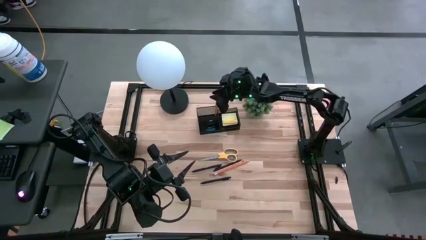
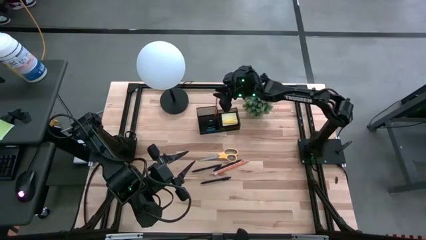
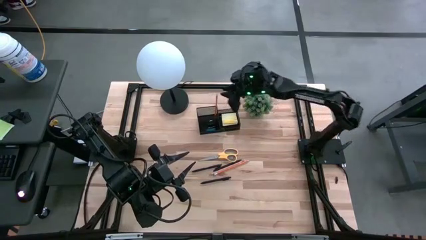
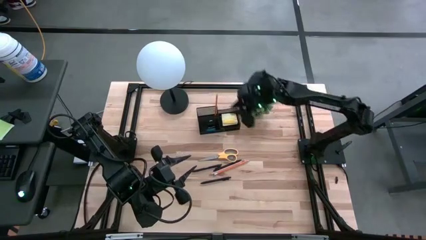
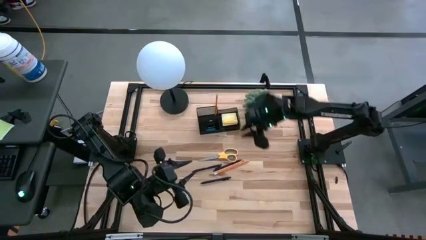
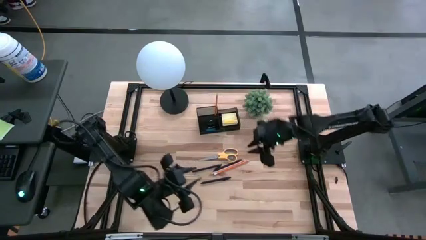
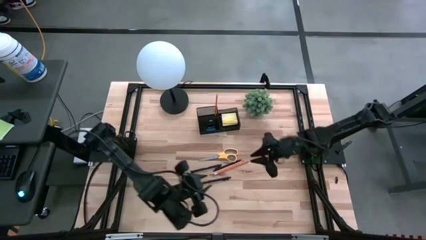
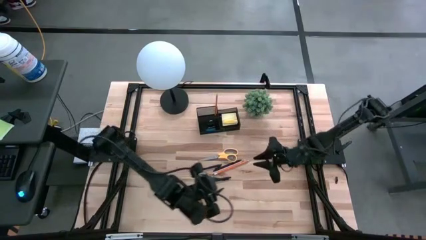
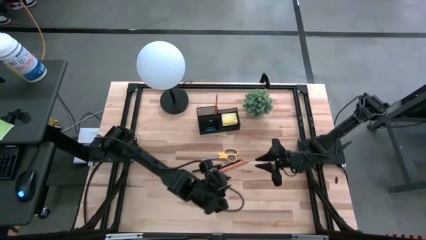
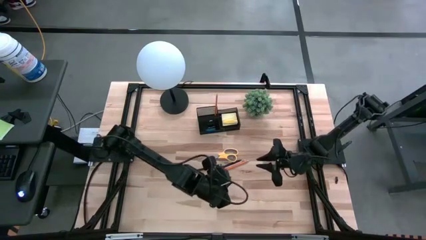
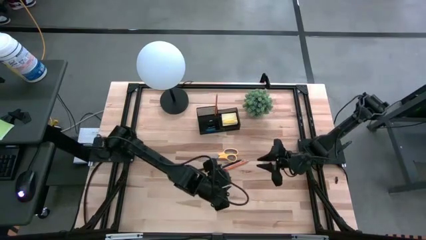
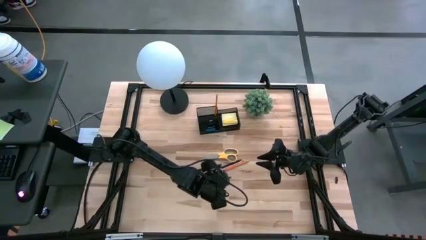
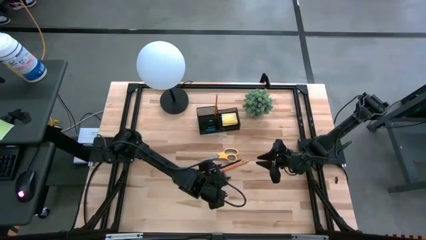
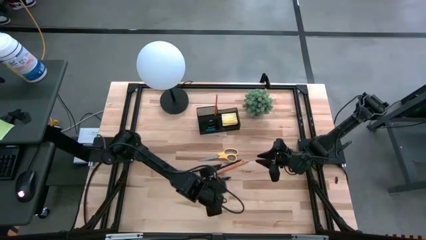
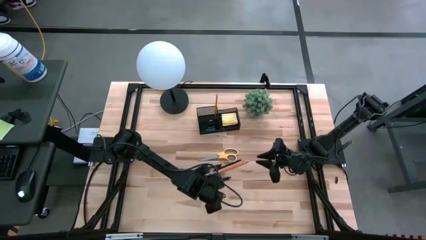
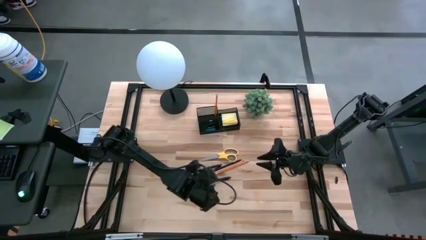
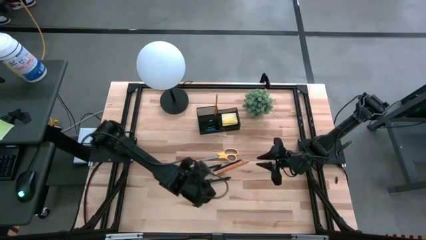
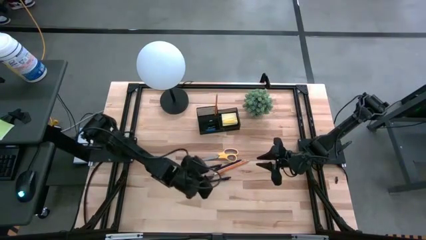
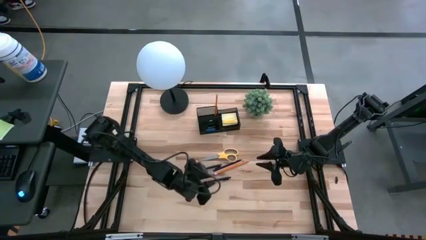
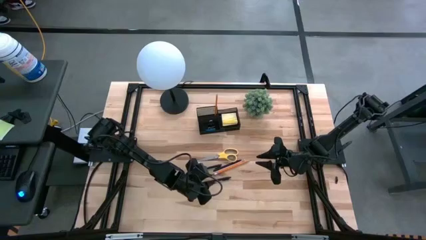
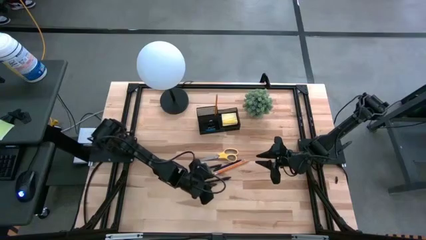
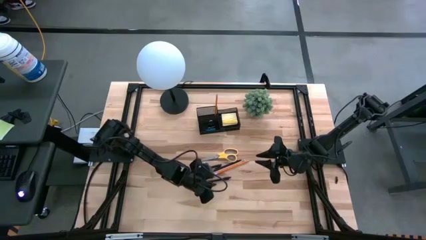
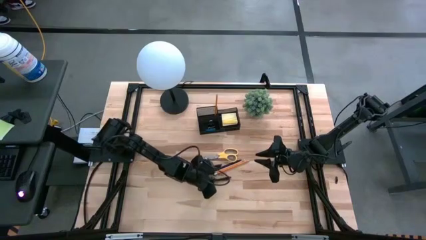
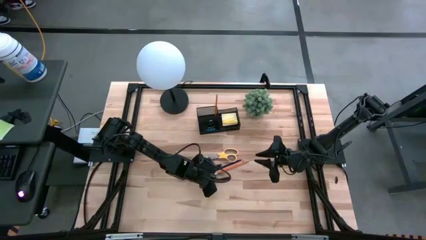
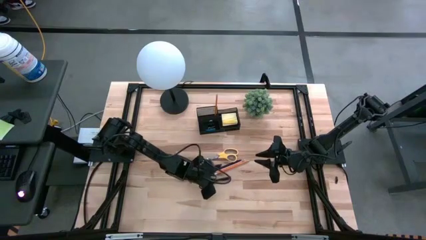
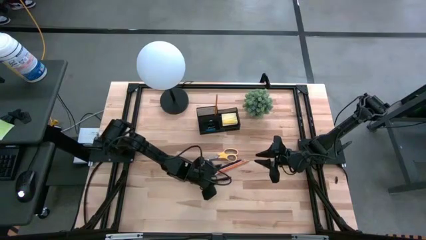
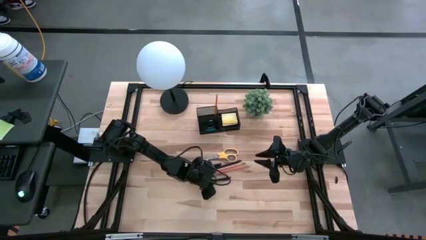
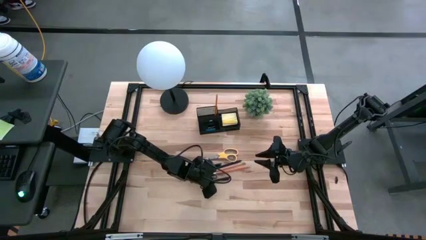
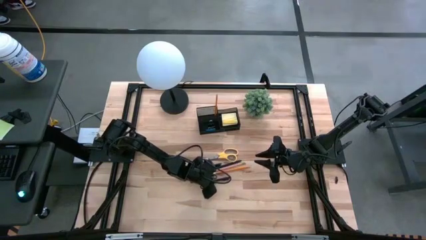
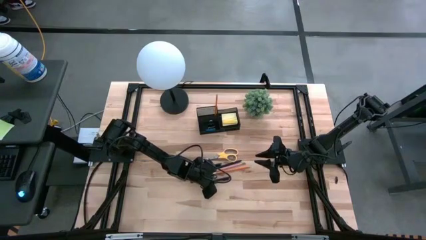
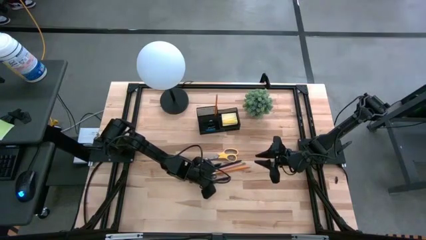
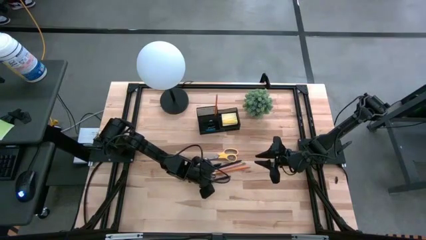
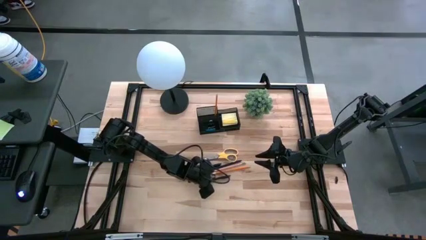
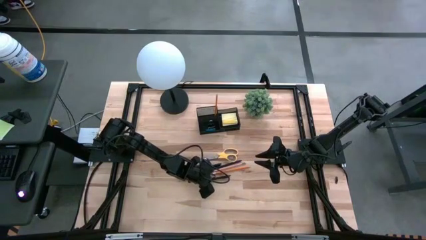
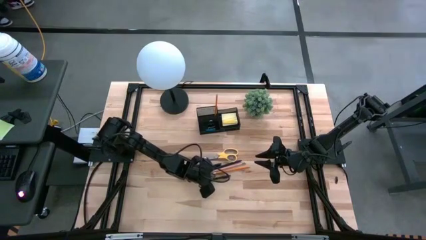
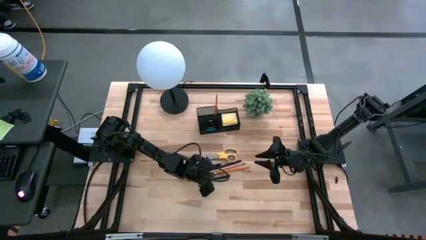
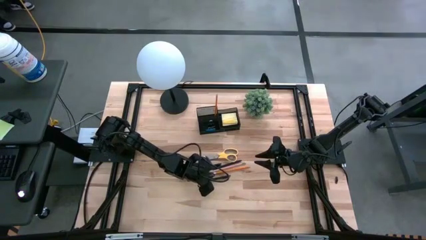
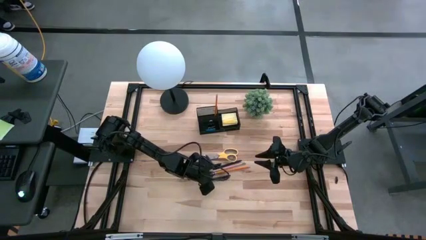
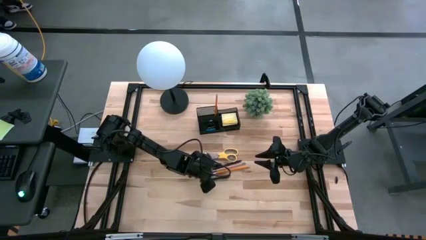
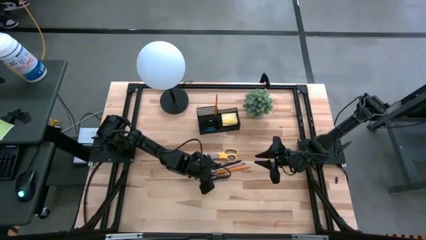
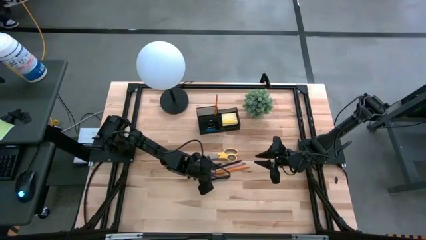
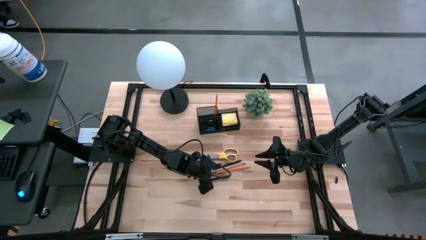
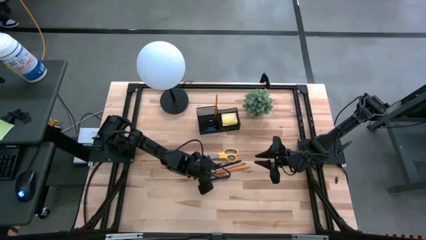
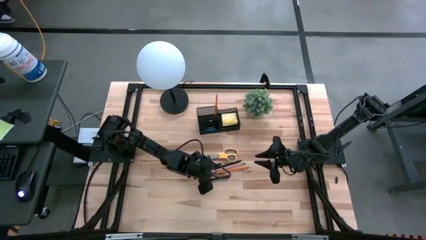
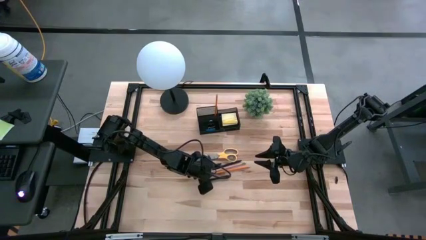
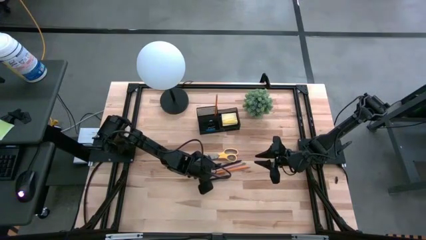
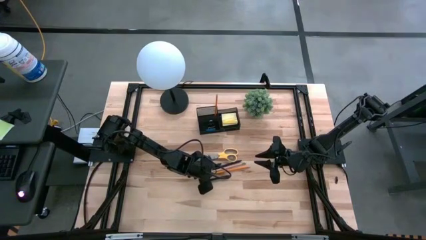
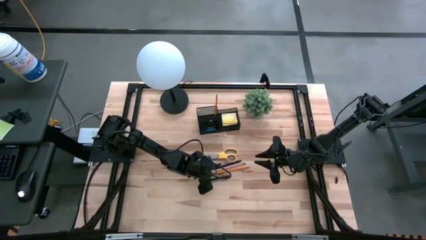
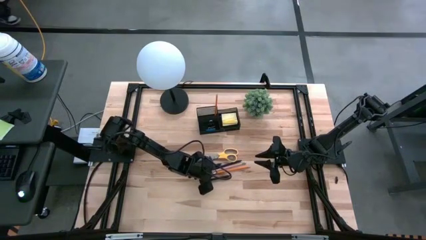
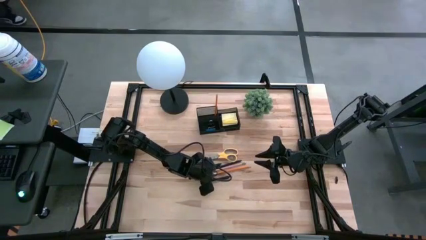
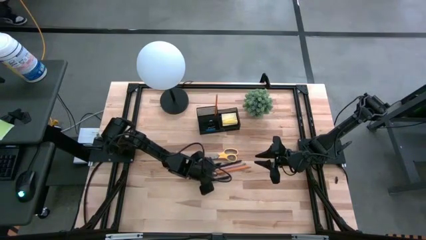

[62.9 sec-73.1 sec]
Task: Pick and place office supplies into organizer
Put the orange pencil into the desk organizer

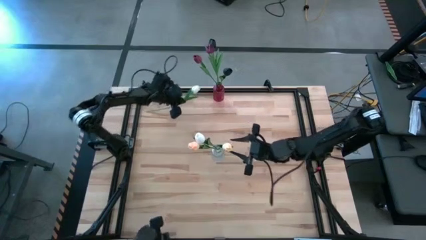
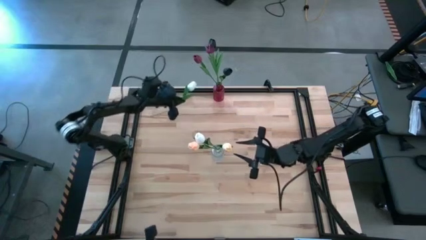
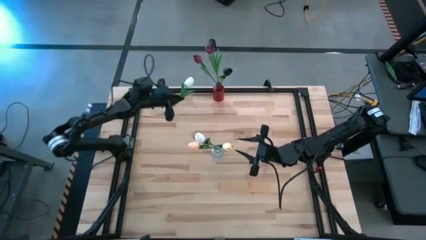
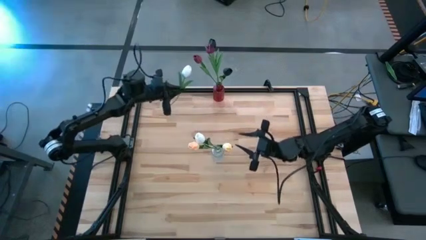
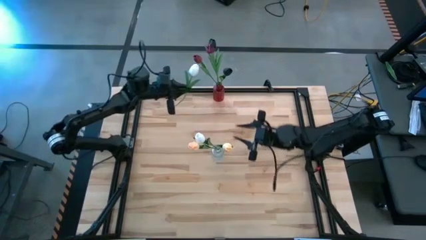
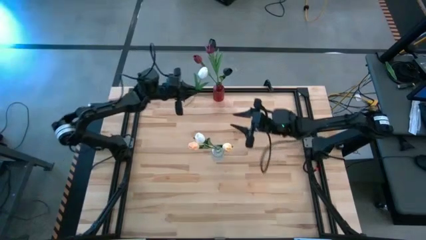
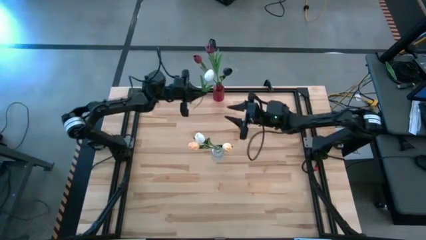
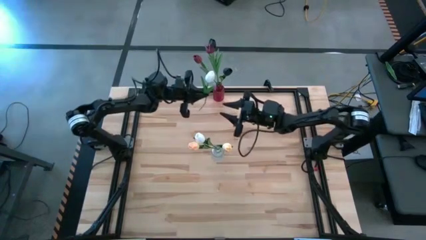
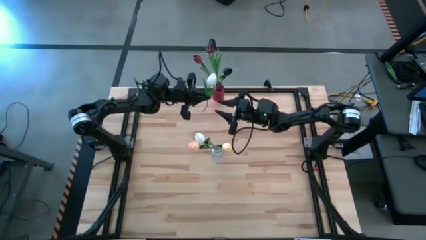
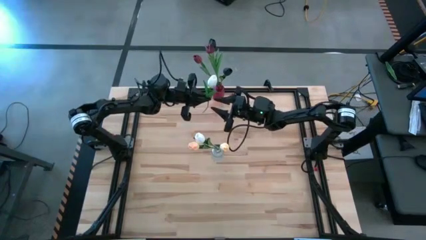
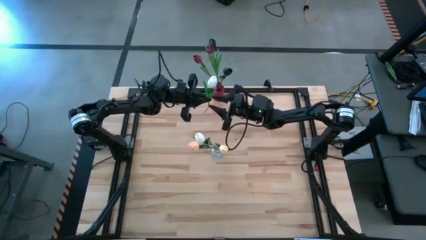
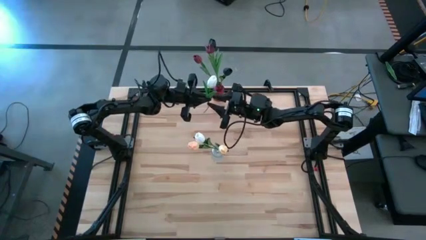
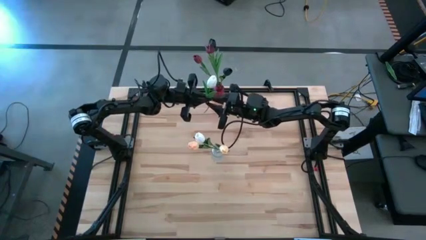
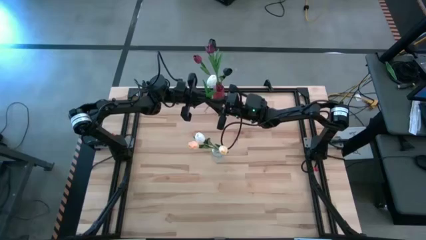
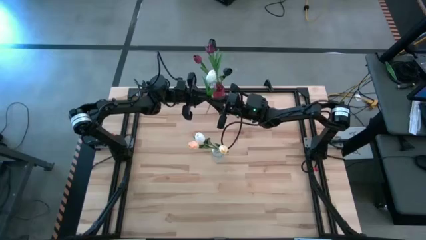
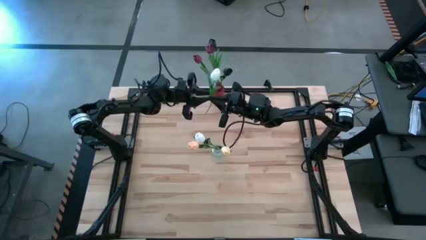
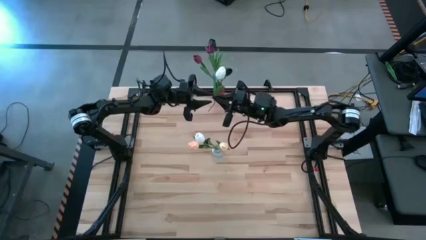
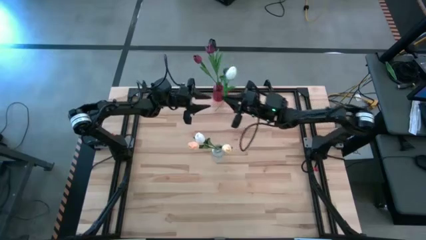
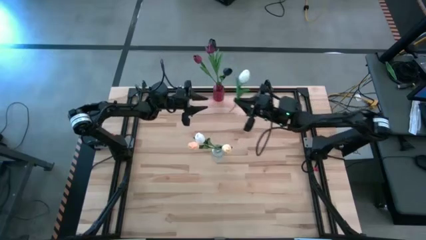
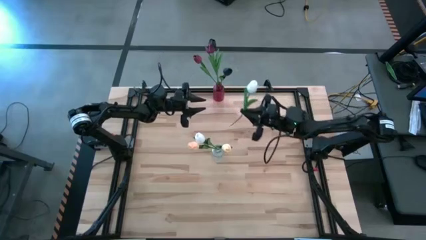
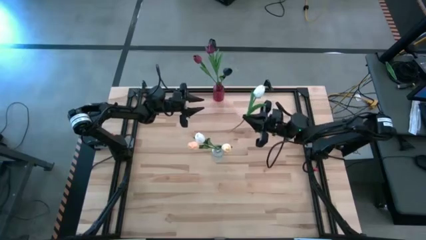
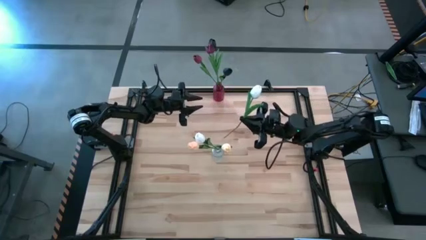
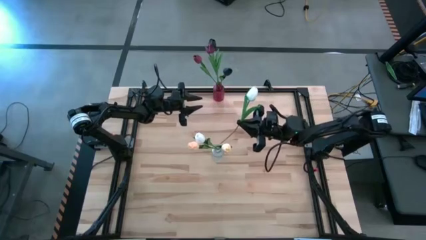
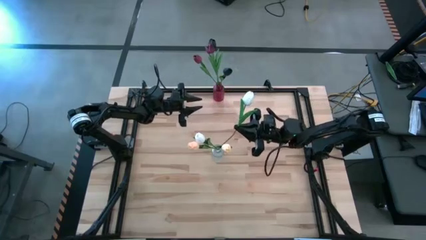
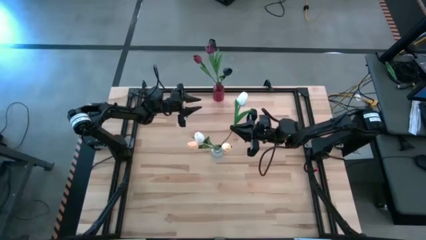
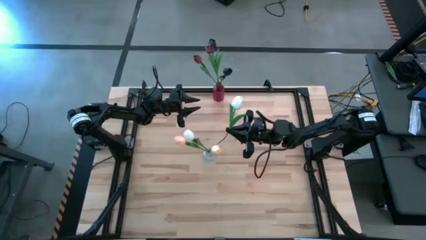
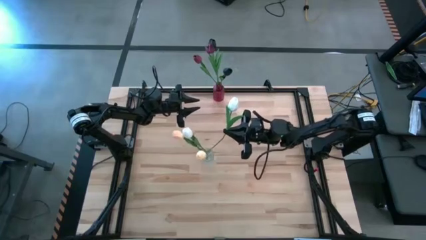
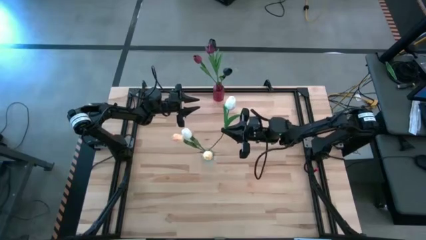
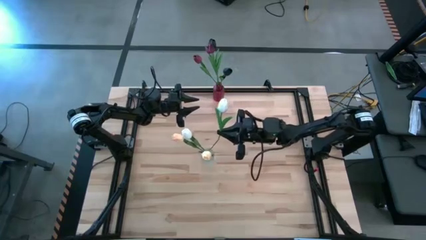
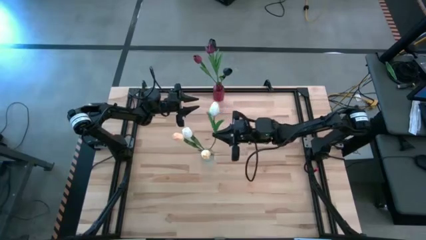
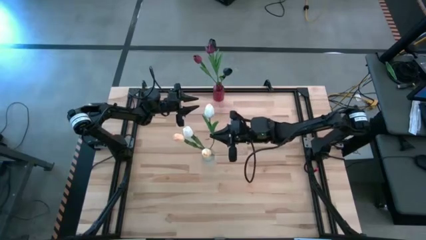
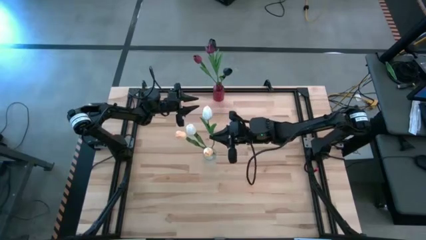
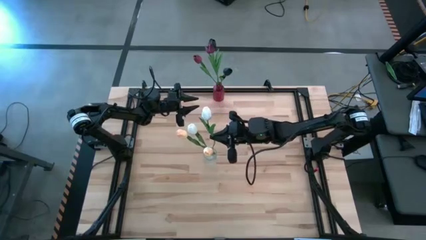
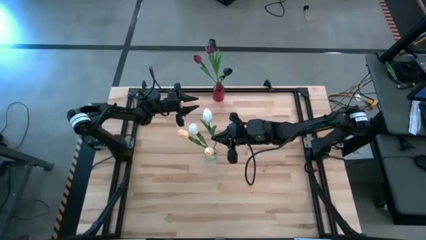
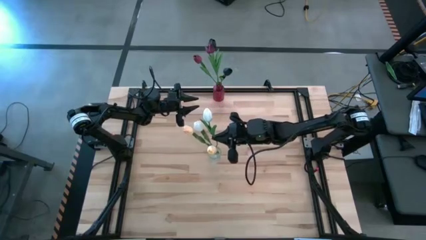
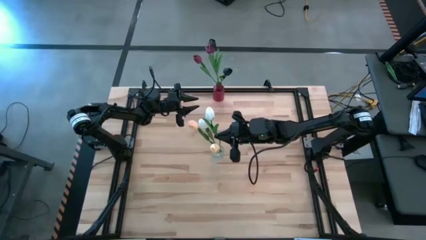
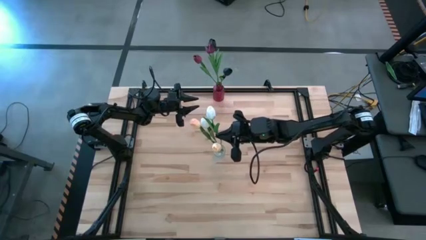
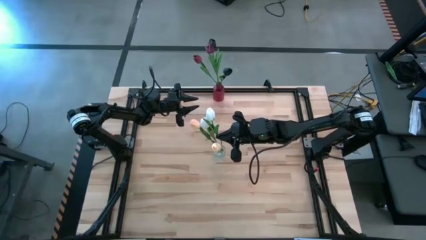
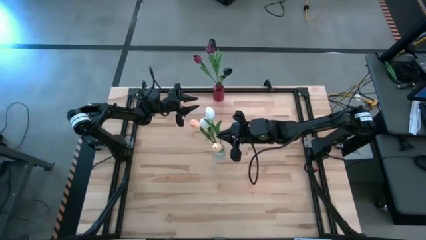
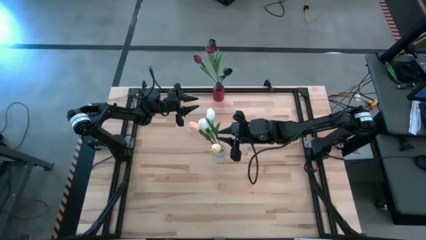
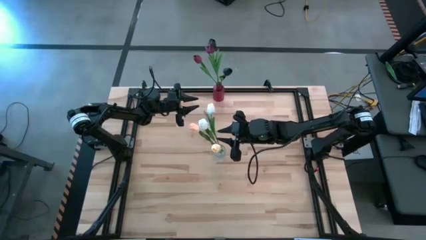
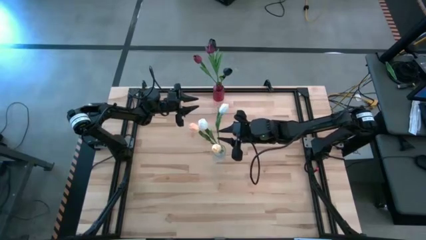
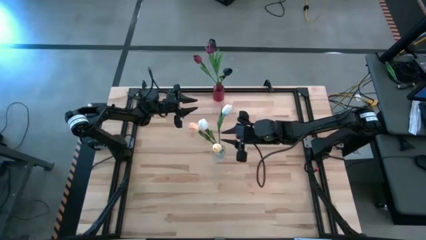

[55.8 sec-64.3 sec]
Task: Sort flowers into vase by color
Put the white tulip into the transparent vase
